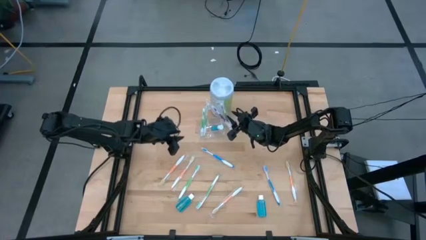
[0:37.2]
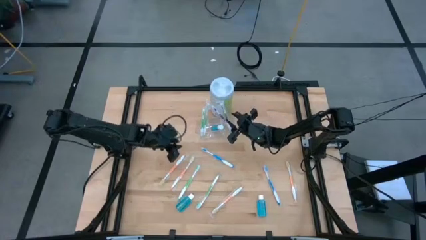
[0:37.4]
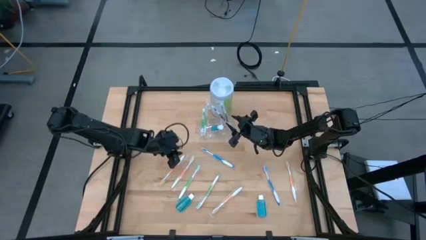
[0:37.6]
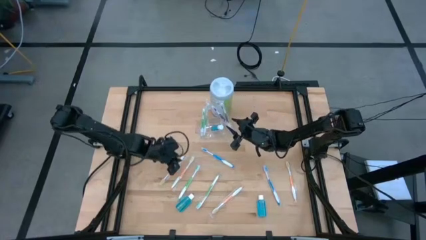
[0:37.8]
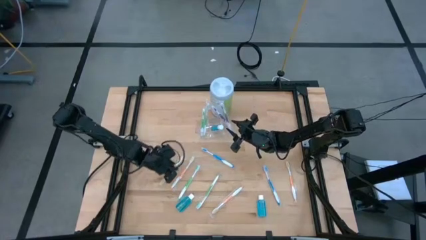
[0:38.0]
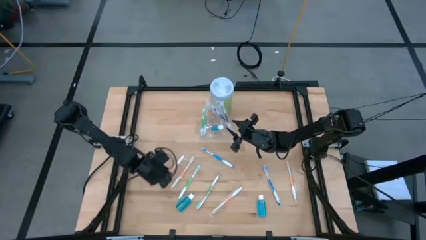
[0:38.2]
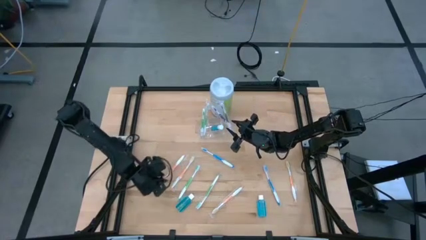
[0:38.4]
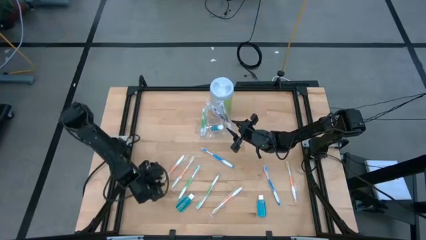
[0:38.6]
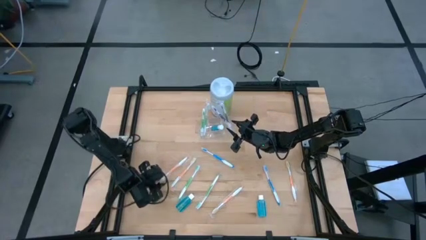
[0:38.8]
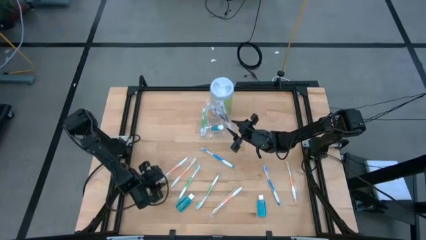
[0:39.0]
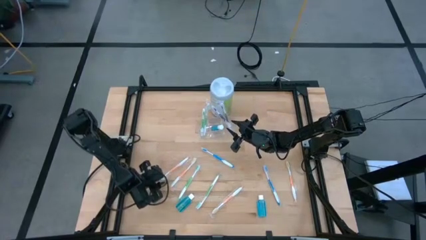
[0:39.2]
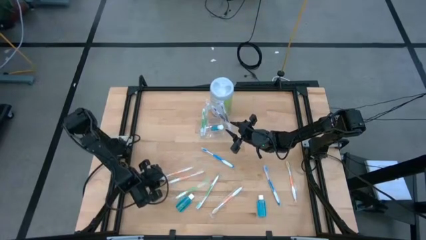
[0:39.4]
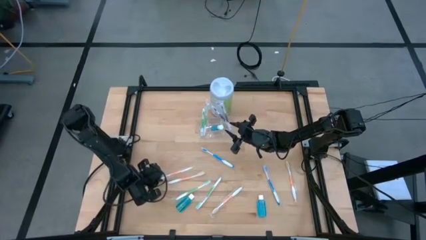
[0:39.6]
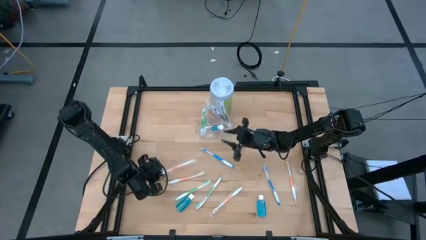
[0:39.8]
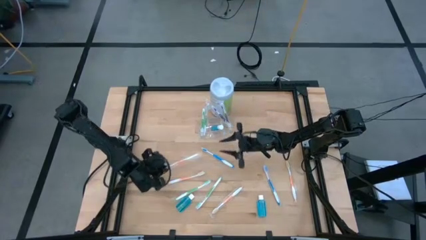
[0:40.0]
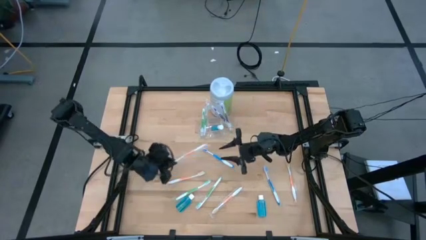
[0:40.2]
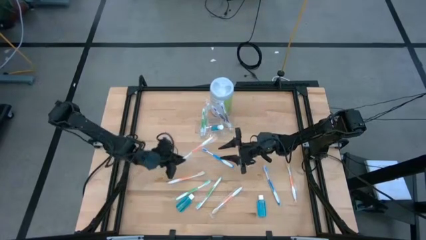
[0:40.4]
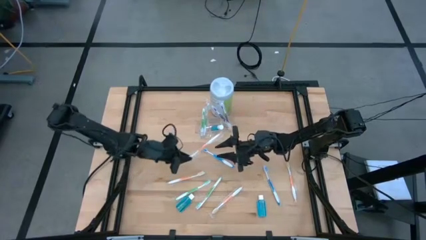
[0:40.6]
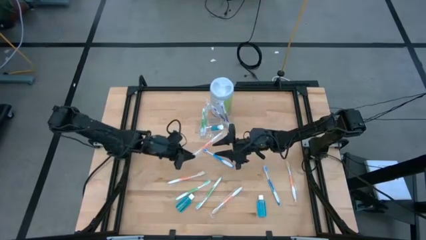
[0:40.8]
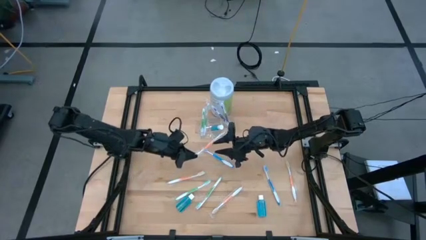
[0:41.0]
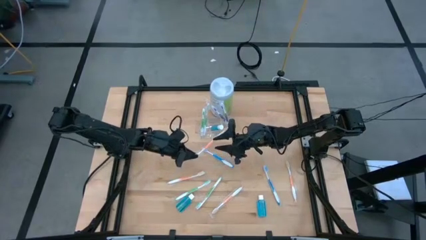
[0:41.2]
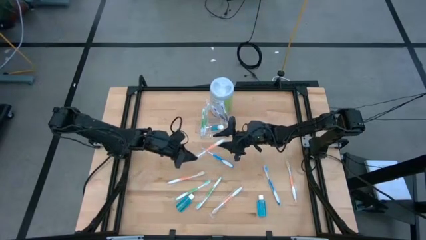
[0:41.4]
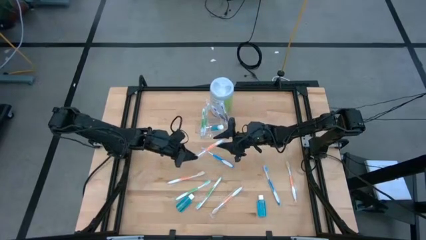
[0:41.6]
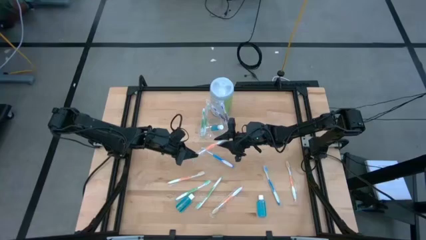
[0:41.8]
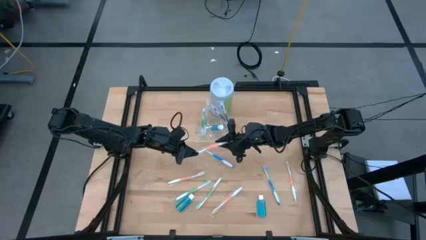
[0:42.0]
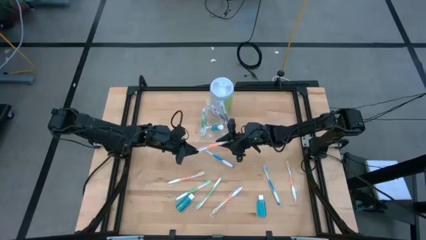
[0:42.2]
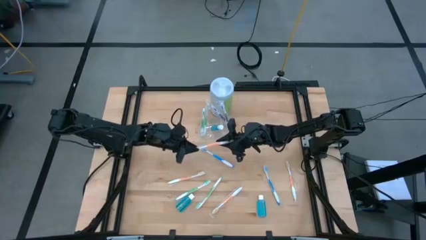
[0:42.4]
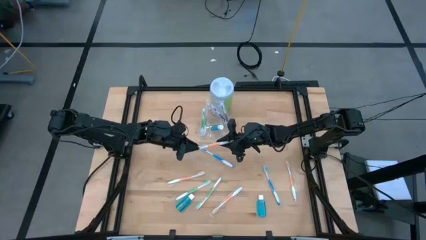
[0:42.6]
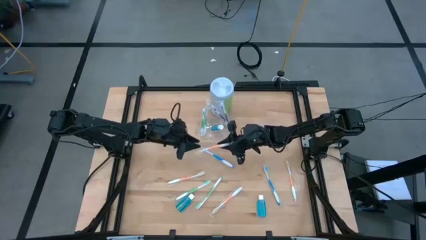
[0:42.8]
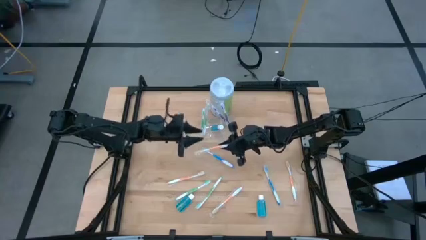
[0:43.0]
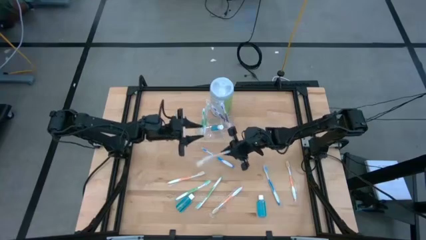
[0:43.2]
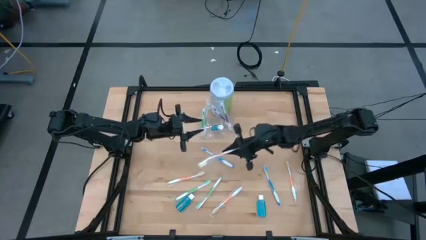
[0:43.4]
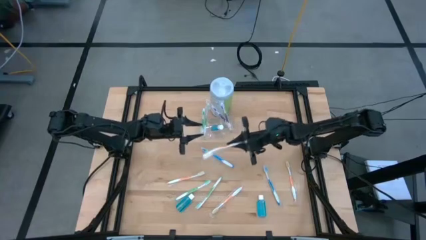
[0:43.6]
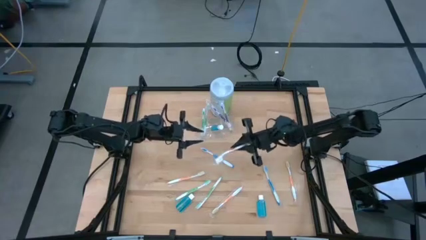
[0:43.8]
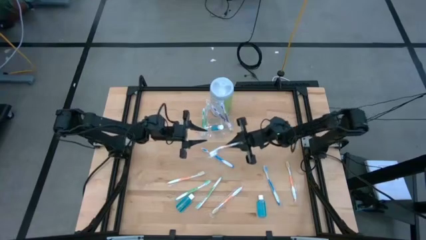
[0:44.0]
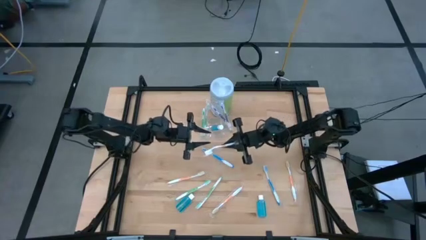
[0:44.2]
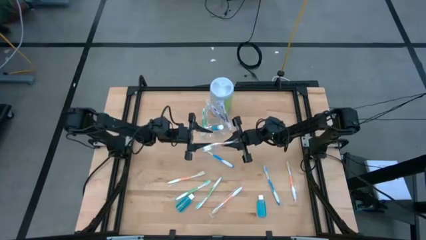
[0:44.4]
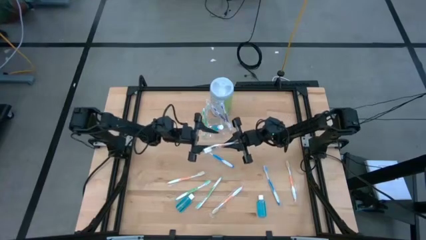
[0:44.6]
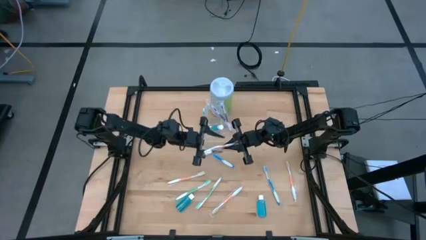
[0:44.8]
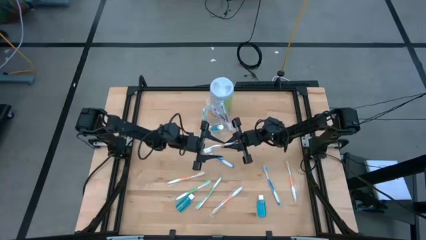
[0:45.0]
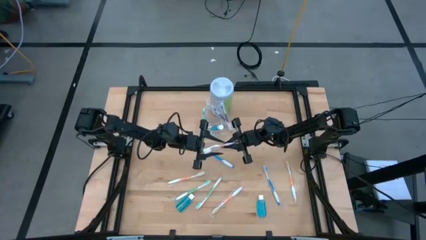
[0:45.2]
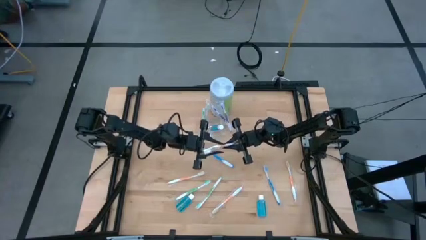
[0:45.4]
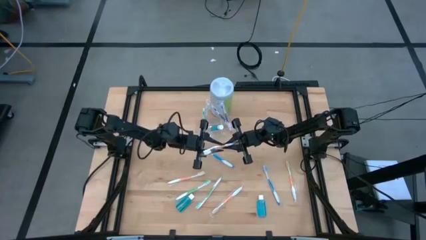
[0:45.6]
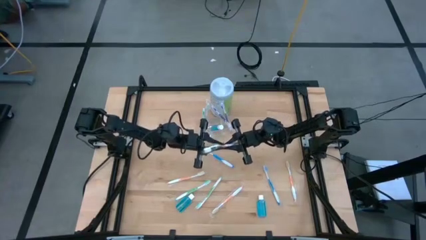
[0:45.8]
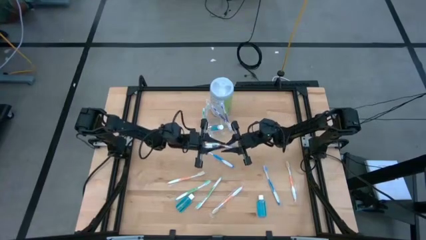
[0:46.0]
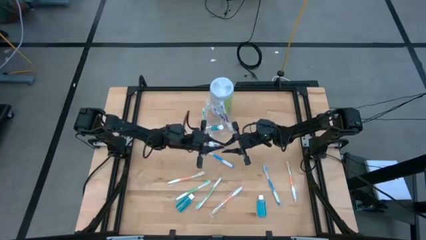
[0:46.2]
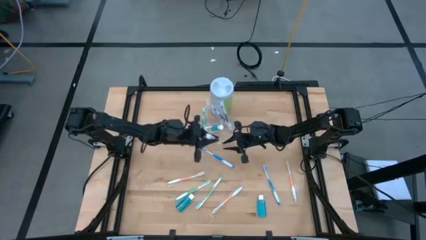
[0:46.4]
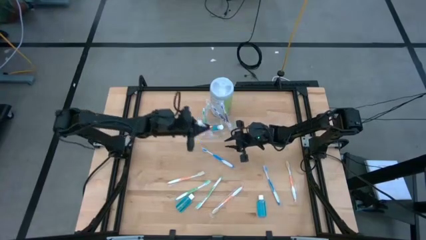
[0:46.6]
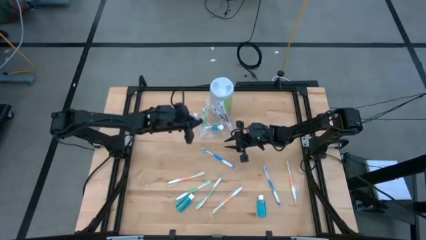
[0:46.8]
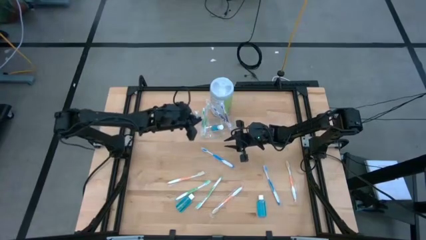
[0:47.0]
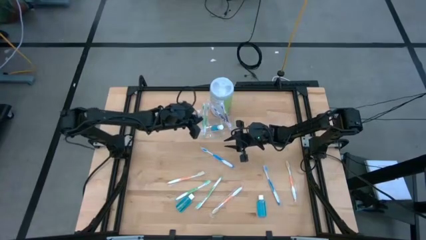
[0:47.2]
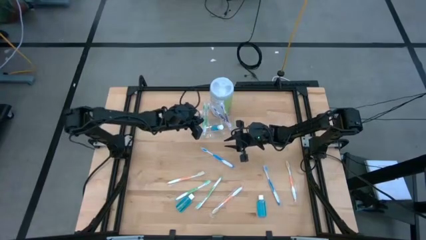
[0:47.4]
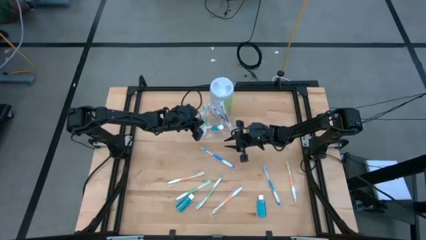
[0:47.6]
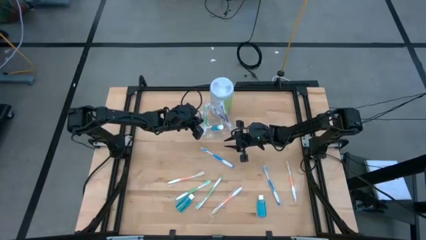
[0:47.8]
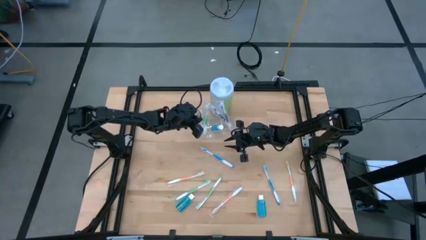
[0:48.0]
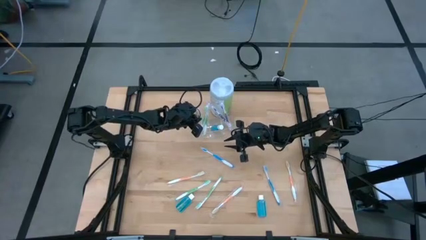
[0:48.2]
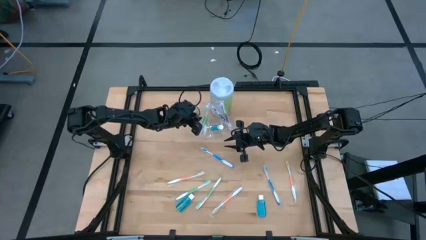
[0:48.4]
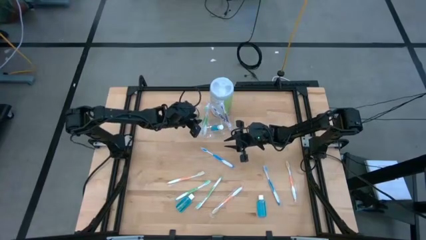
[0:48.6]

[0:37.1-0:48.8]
Task: Pick & Place toothbrushing station
Put the orange toothbrush into the transparent organizer

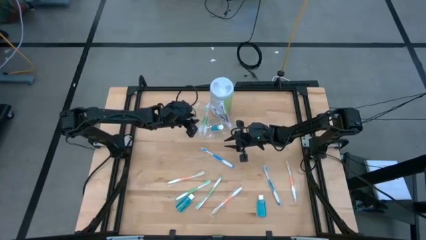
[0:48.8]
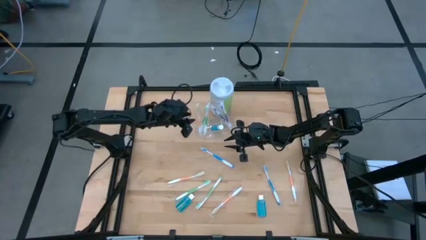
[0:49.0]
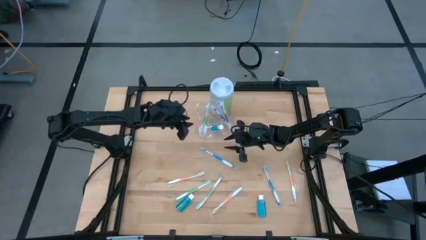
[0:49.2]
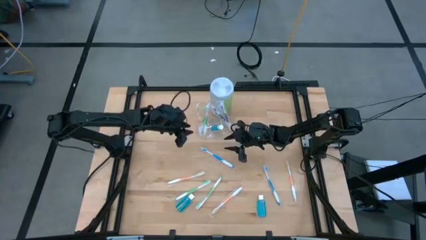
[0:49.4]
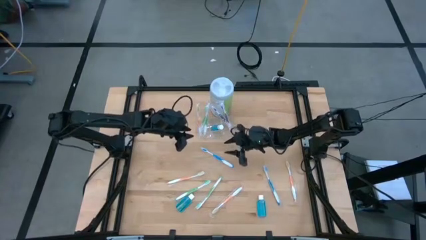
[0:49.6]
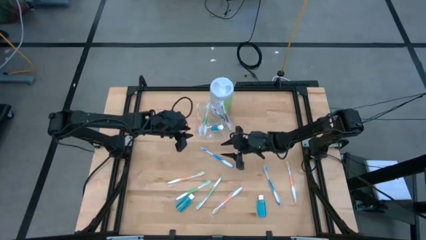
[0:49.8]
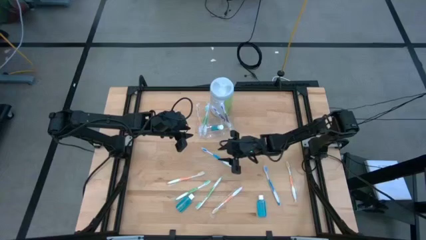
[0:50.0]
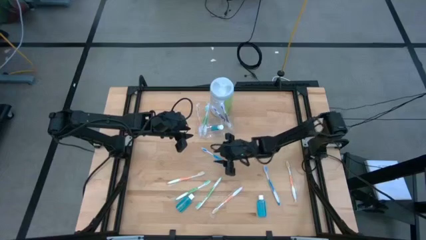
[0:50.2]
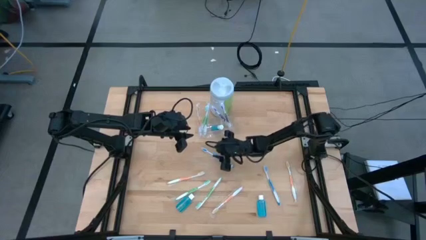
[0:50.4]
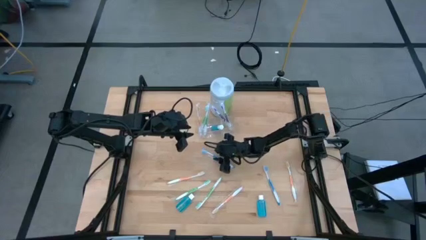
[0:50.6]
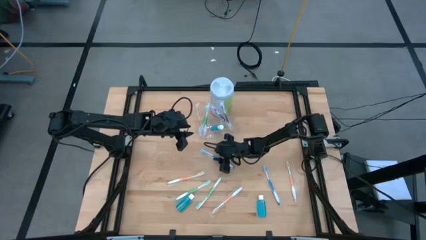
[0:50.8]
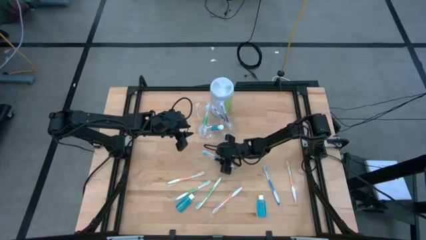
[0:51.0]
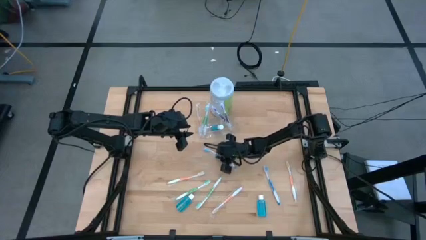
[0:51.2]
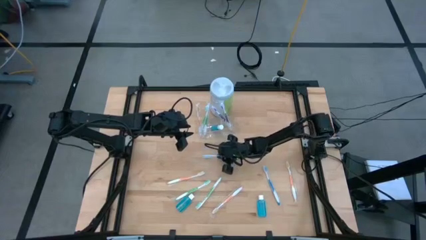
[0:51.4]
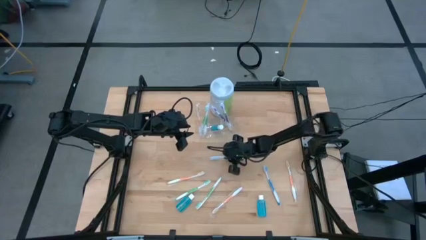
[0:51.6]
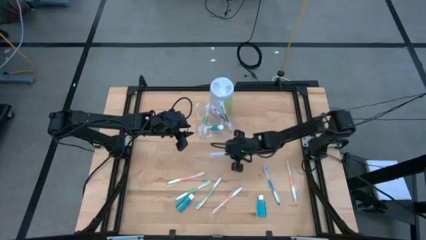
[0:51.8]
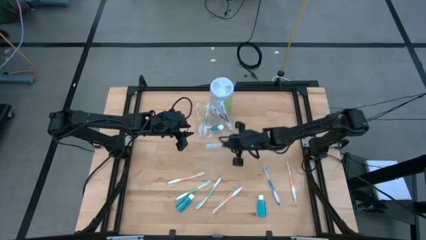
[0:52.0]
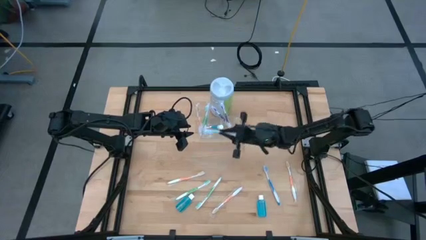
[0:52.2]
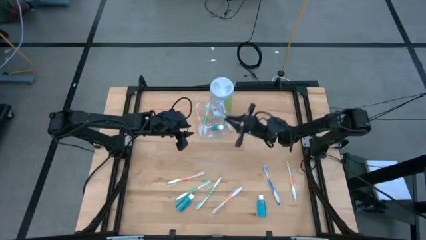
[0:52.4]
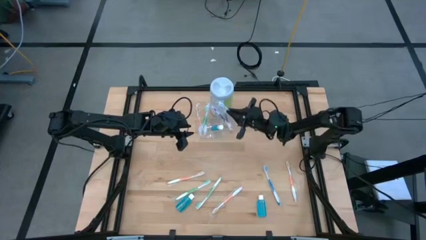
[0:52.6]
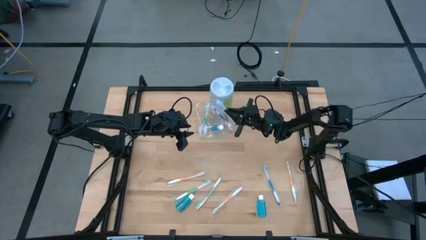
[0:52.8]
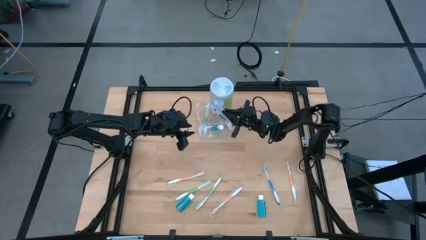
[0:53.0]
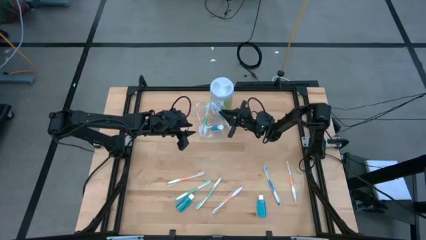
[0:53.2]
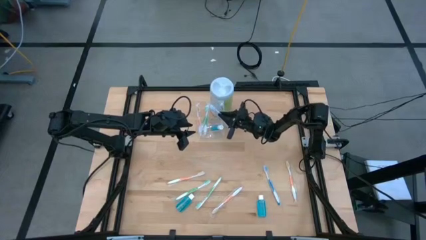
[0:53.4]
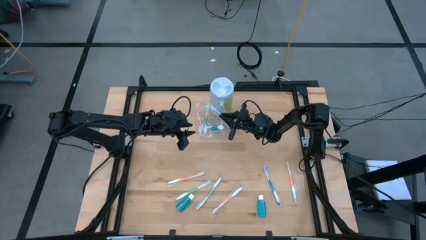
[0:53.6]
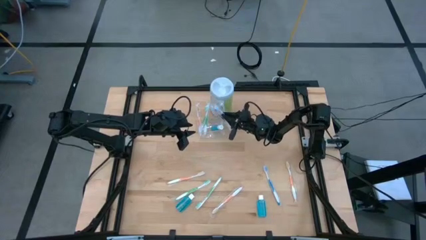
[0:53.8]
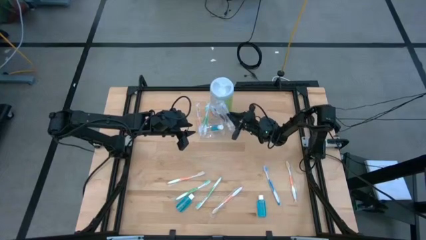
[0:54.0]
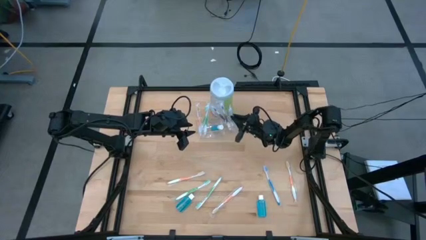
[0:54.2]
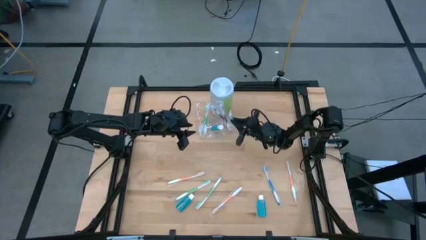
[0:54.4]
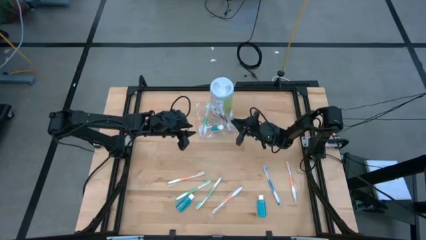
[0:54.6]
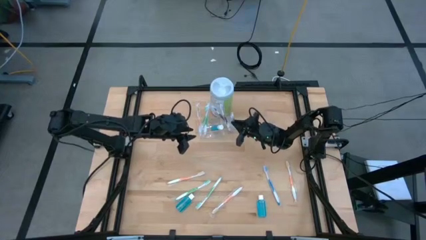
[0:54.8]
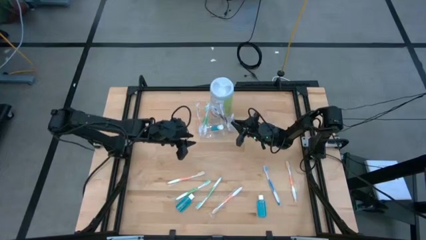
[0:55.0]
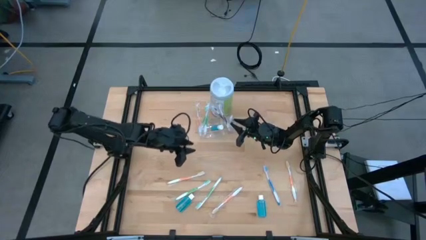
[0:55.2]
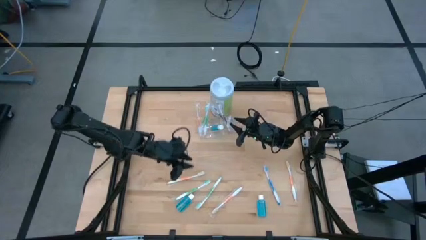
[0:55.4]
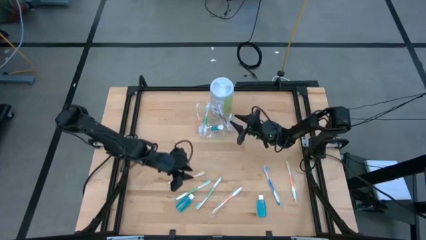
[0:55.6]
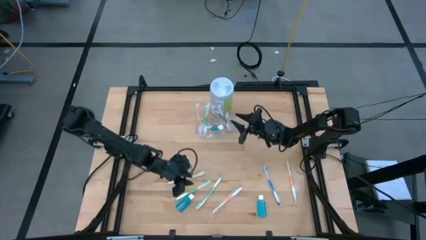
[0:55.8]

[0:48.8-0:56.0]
Put the blue toothbrush into the transparent organizer
